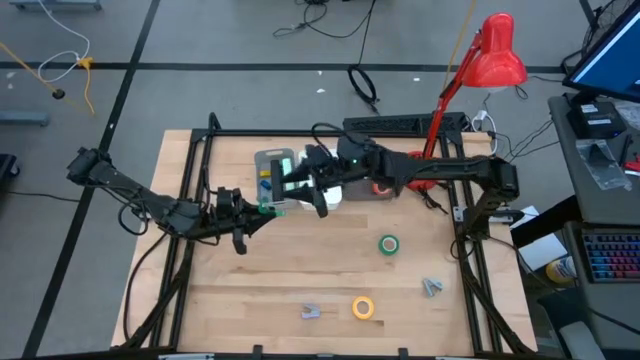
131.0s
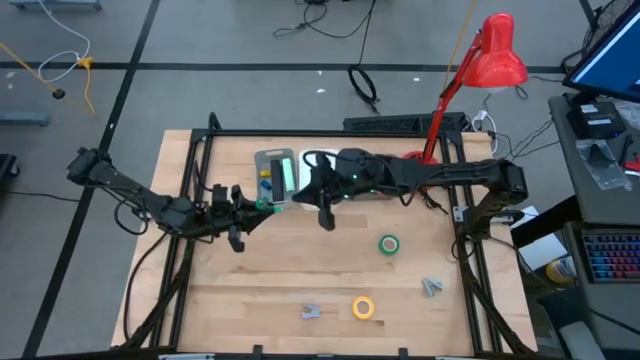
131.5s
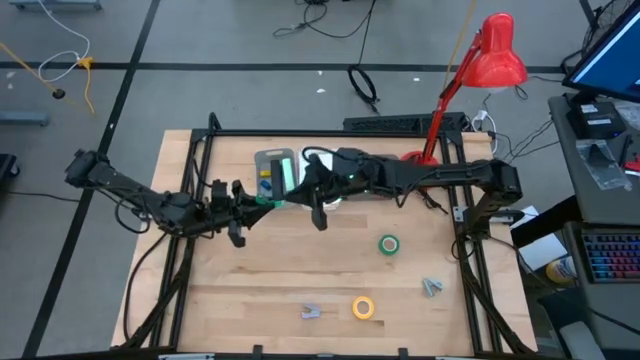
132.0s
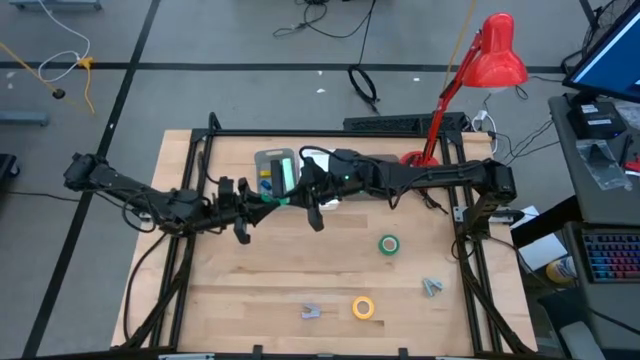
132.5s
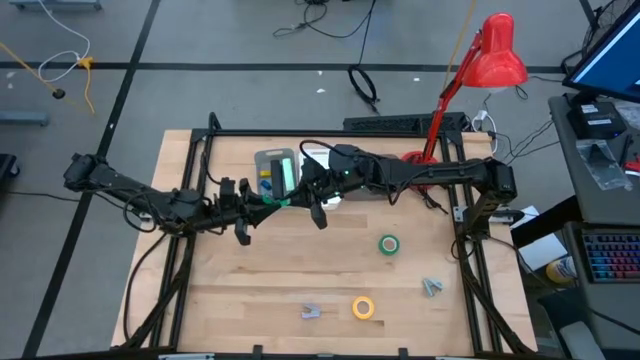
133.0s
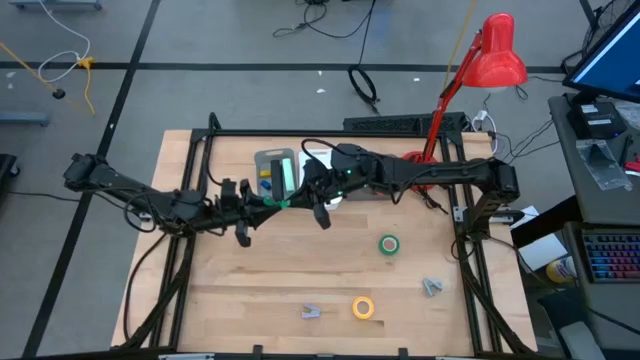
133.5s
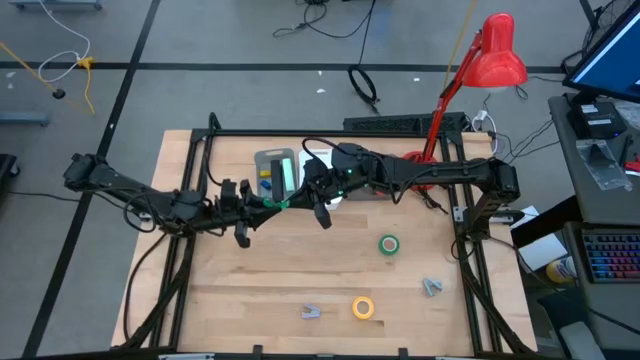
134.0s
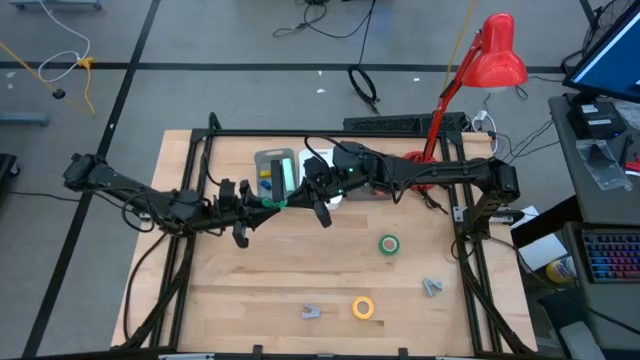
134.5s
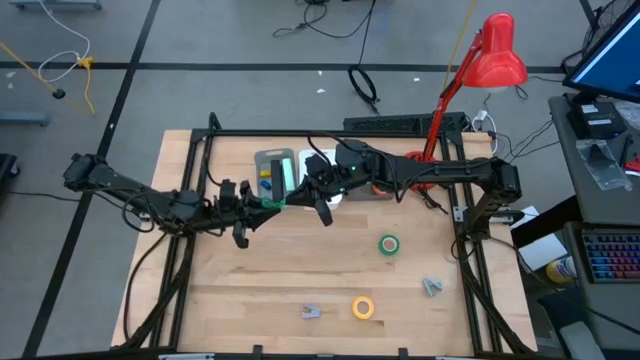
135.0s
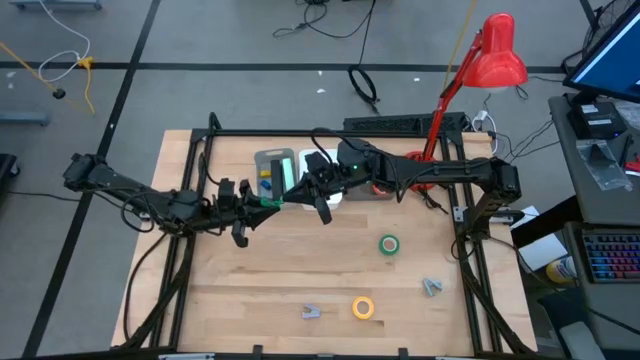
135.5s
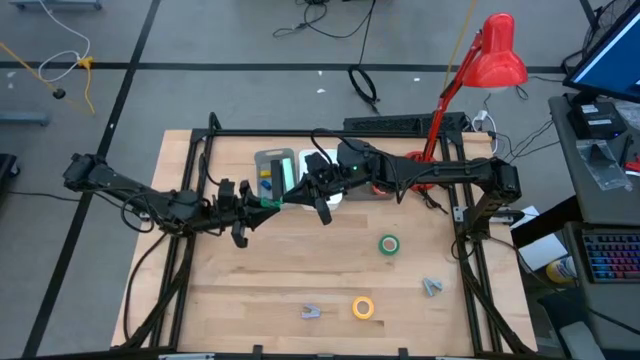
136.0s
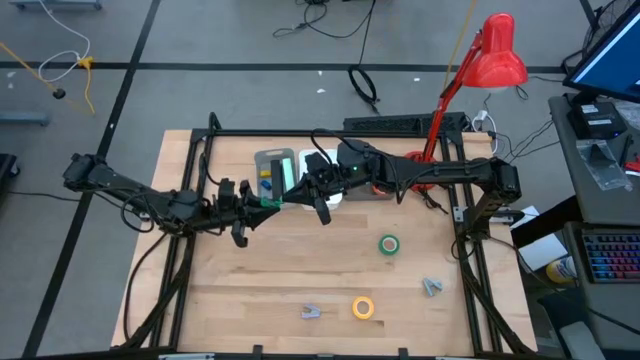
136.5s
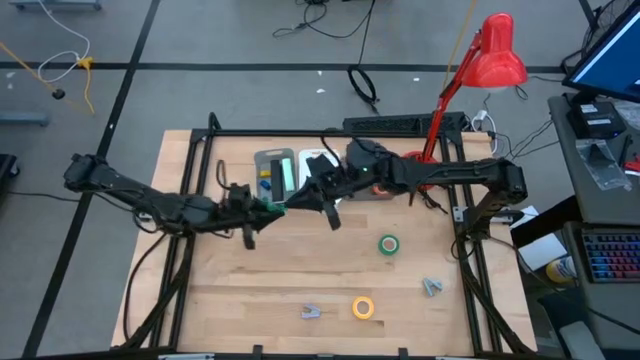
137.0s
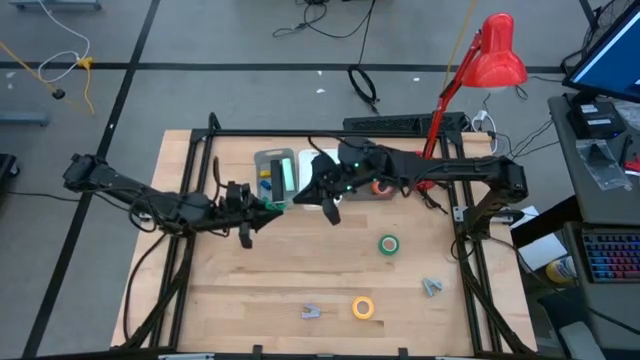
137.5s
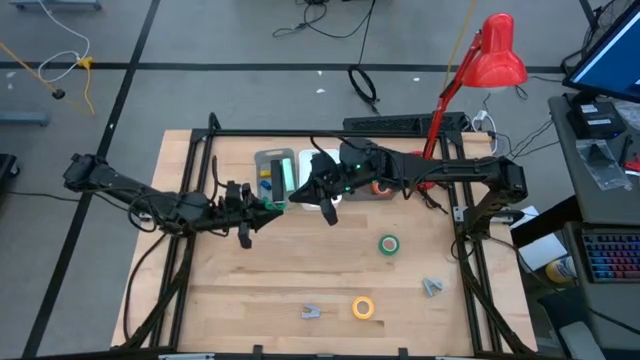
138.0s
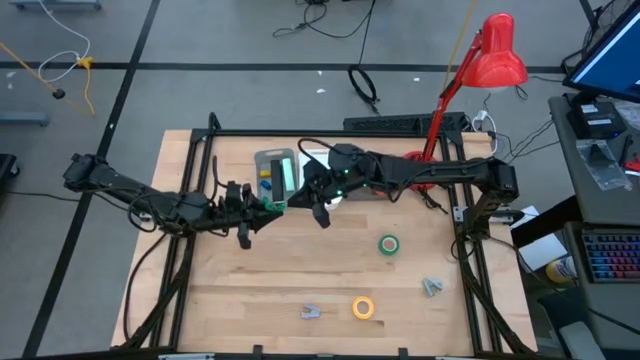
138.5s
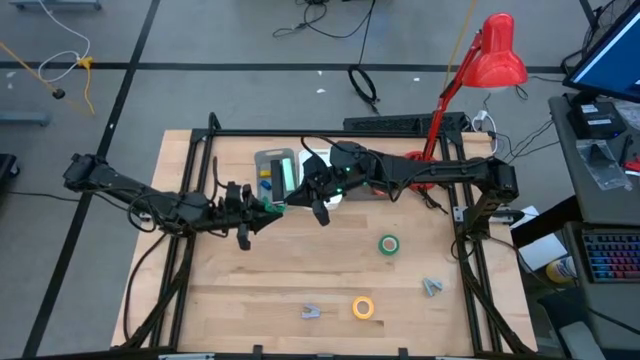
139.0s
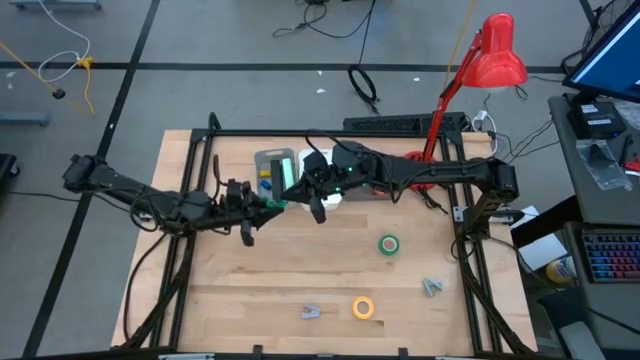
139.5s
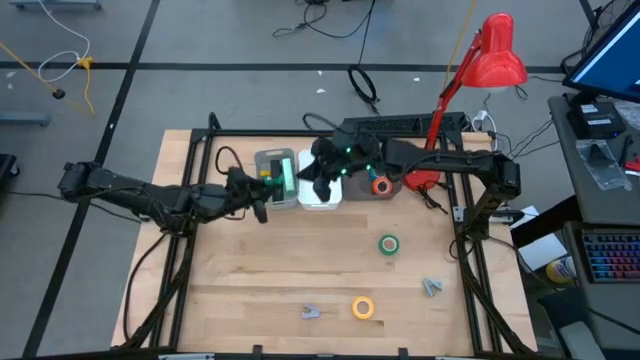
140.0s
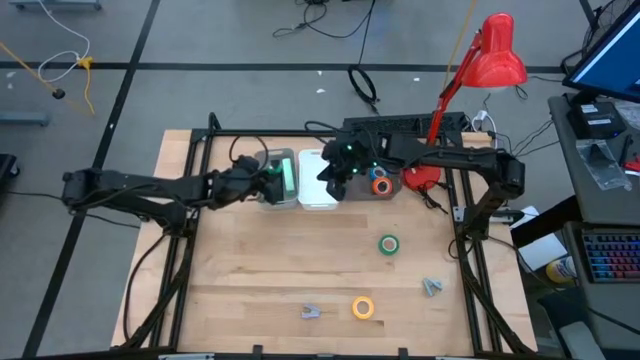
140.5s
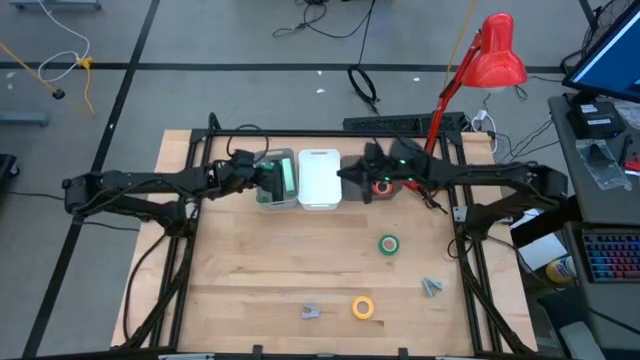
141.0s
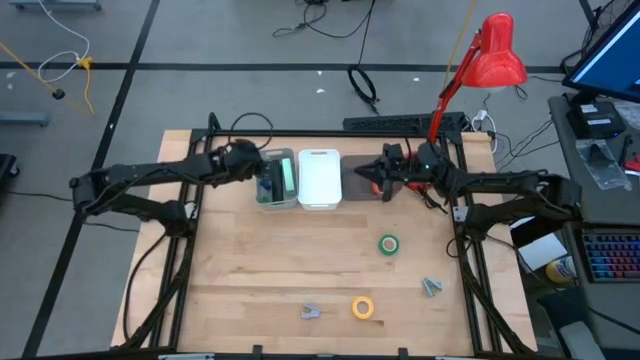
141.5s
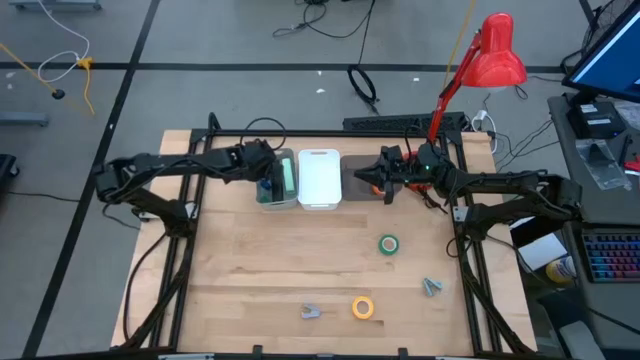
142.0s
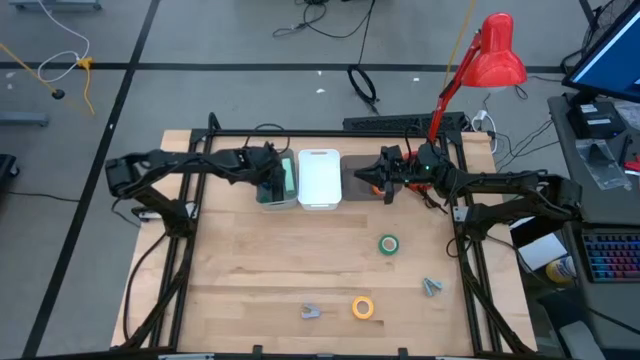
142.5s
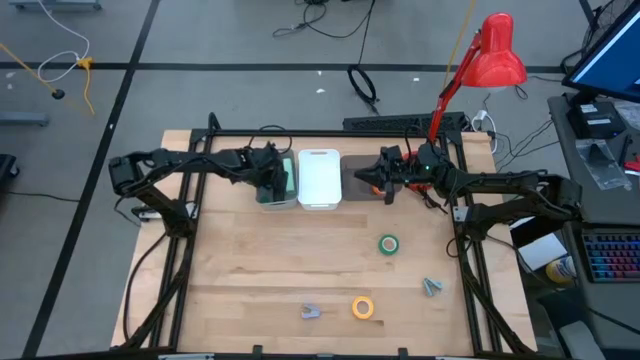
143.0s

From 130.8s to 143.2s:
Task: Pick and place Stapler, Stapler remover, tape
Put the small green stapler into the grey bin

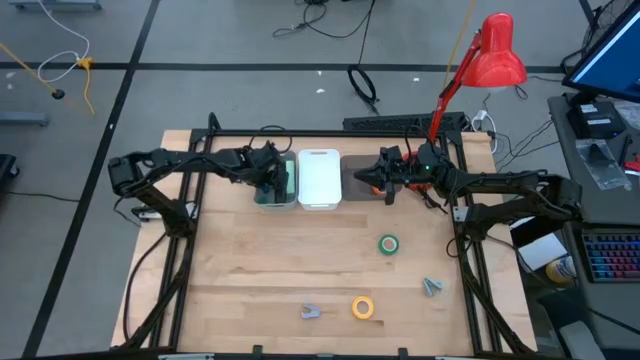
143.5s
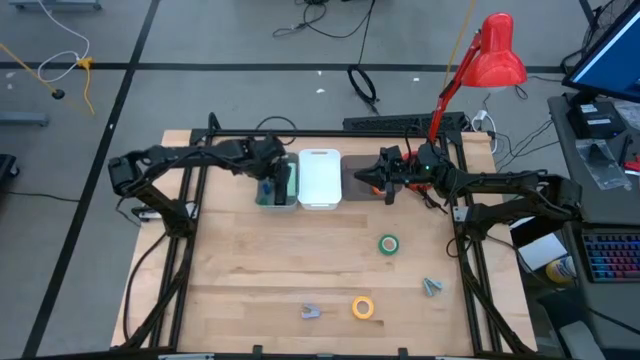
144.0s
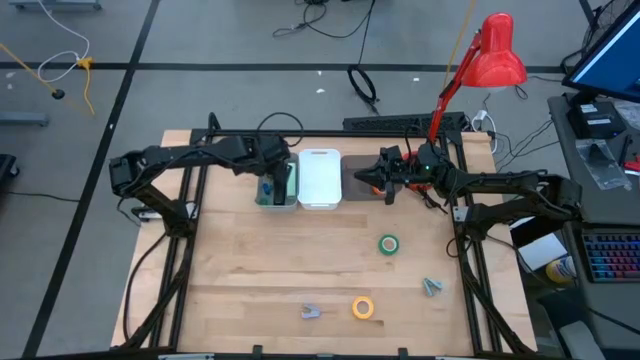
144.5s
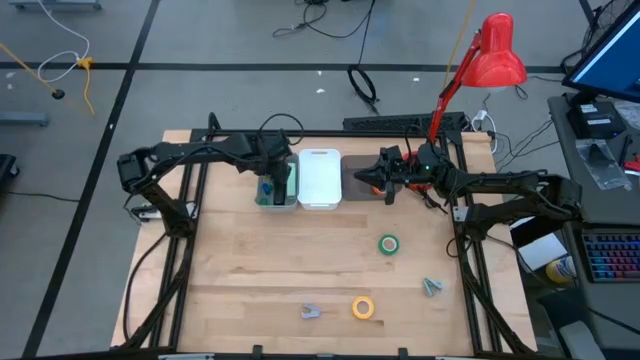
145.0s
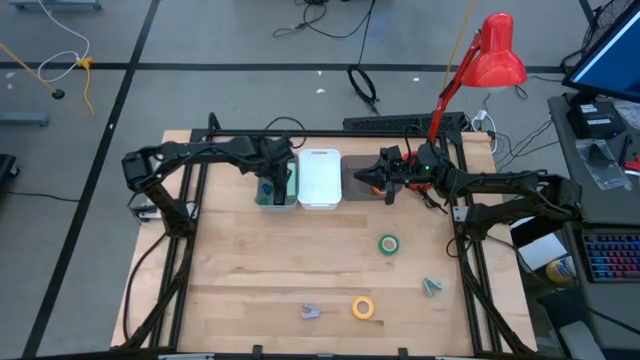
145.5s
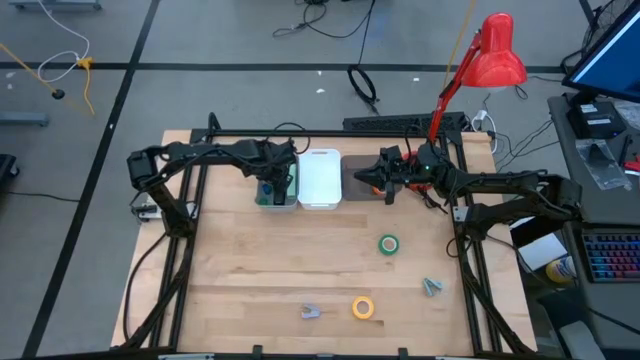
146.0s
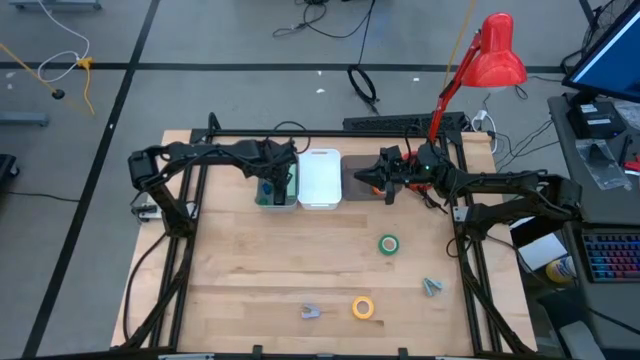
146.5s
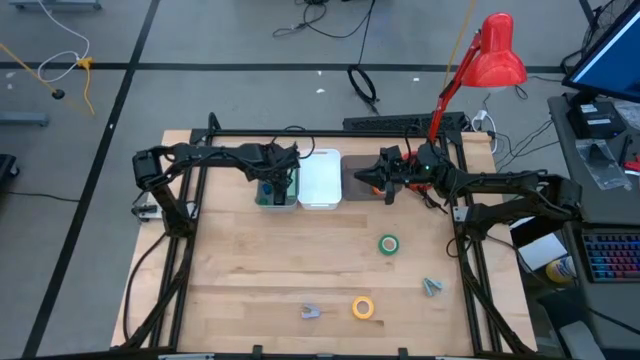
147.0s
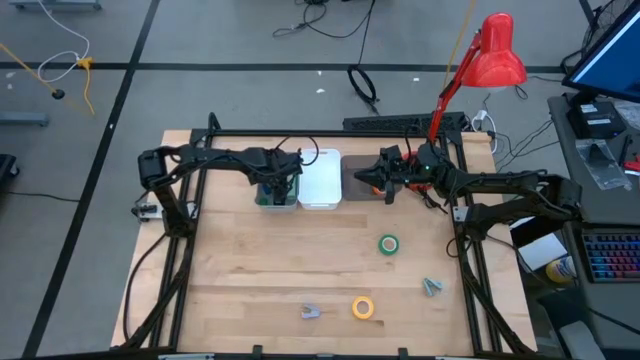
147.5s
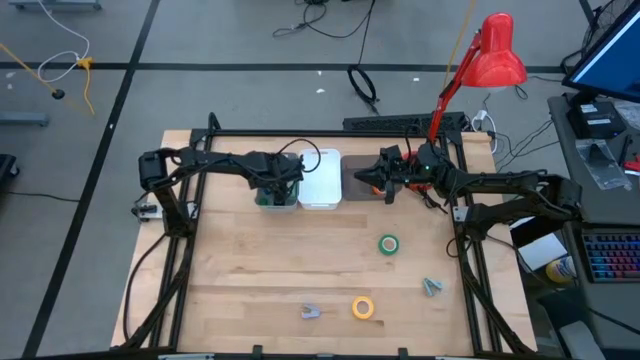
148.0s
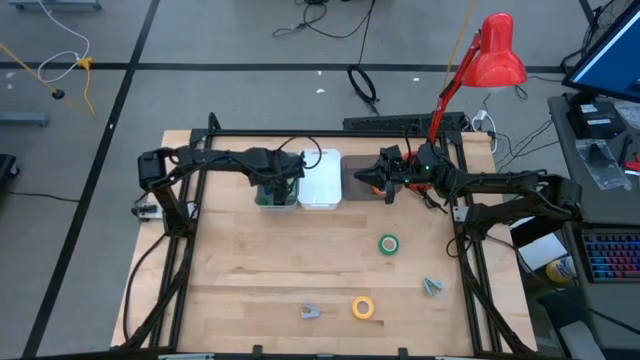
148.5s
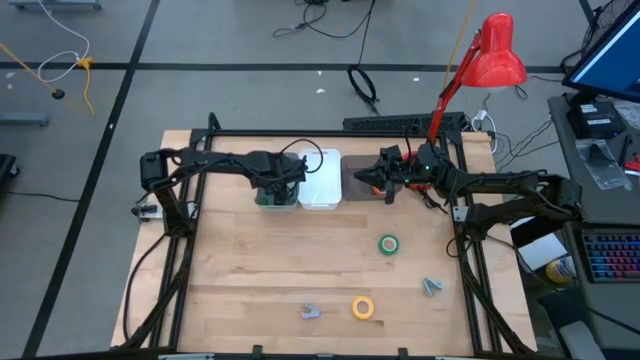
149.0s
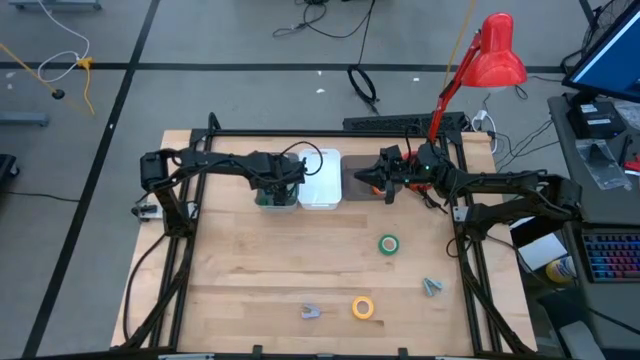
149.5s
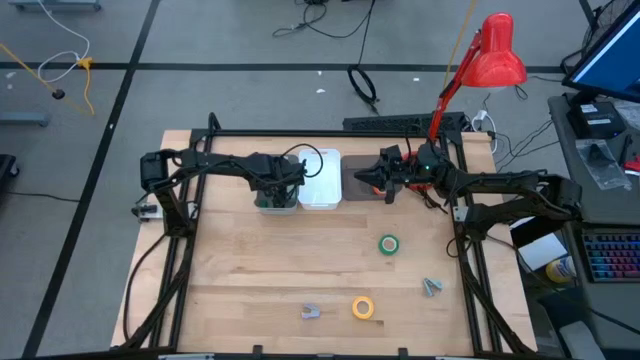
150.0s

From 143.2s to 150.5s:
Close the small green stapler

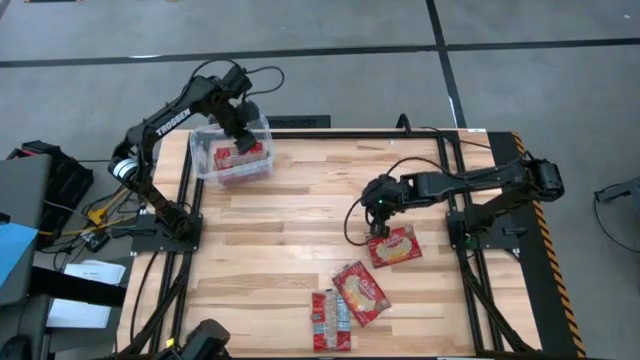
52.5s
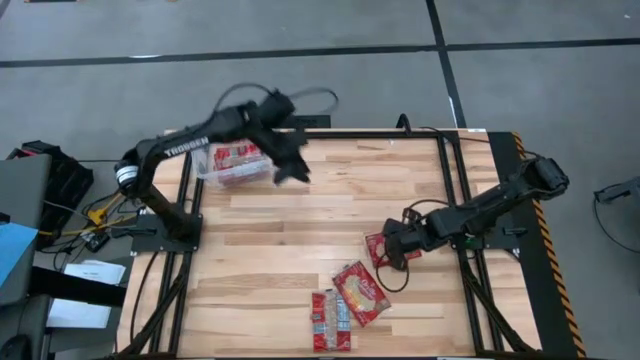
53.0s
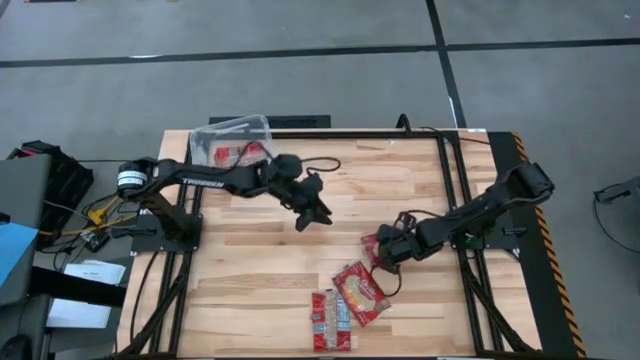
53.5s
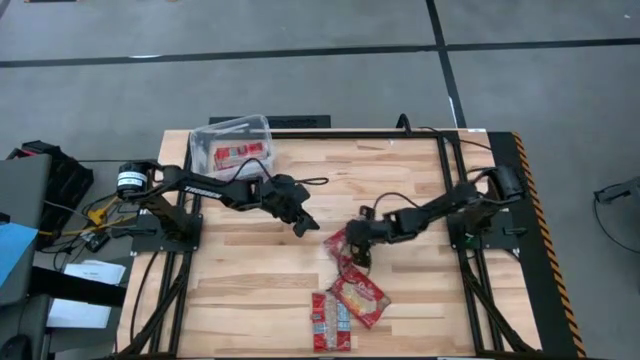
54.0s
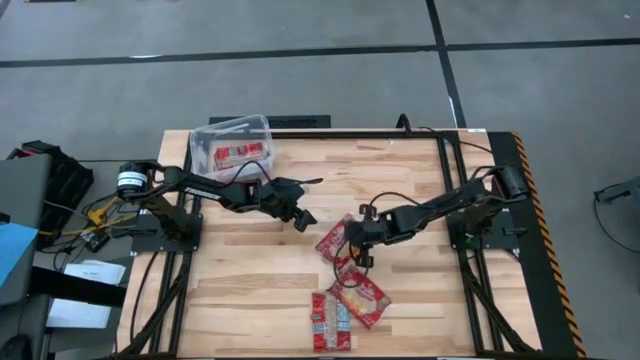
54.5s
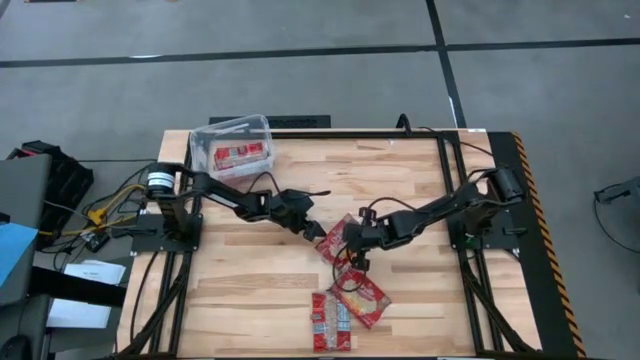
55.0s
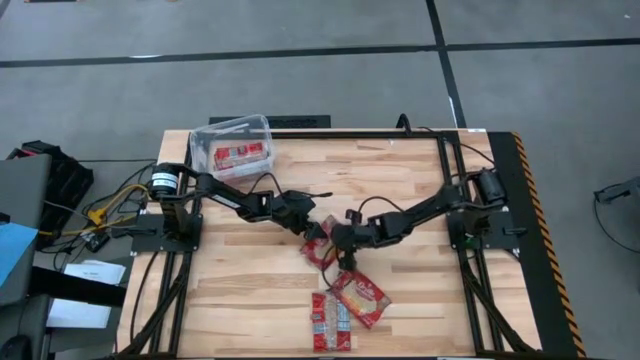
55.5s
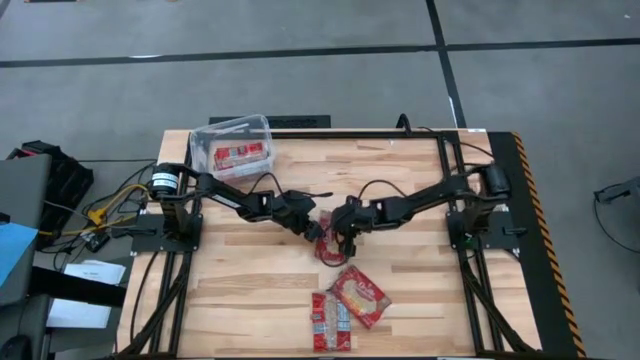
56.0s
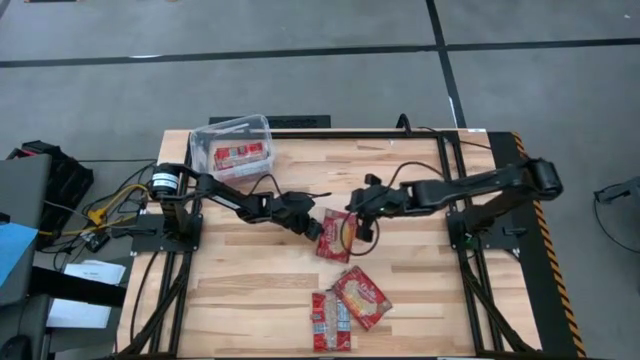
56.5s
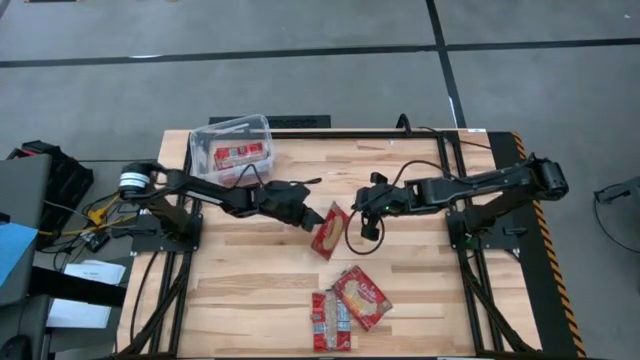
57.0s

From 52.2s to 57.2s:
Task: Sort popcorn bags into baskets
Put the red popcorn bag into the transparent bin
